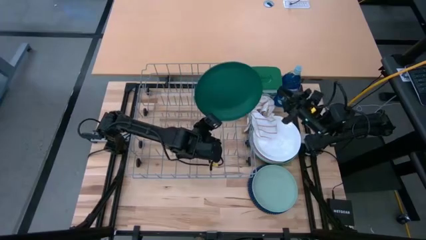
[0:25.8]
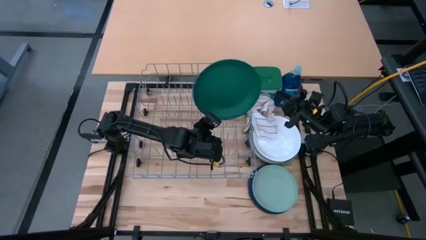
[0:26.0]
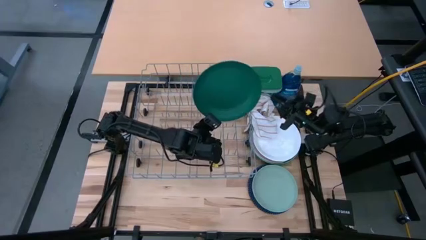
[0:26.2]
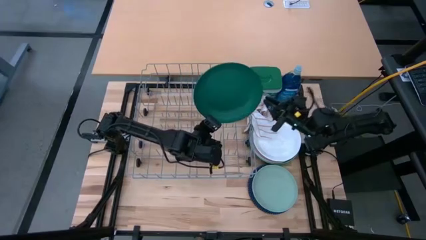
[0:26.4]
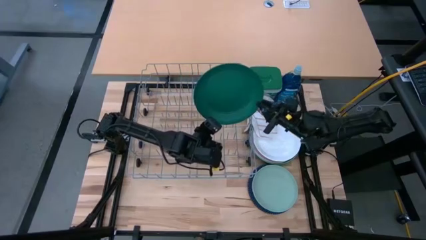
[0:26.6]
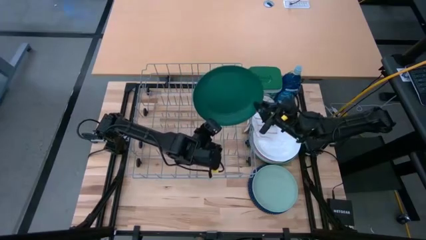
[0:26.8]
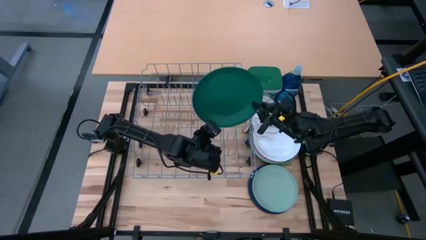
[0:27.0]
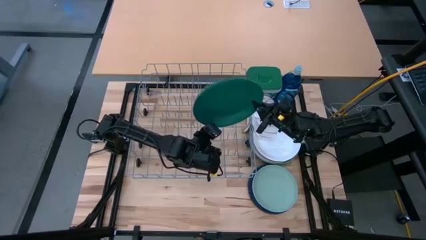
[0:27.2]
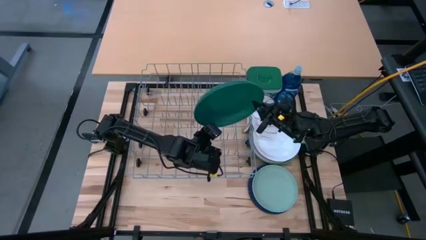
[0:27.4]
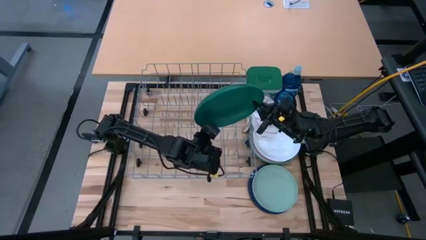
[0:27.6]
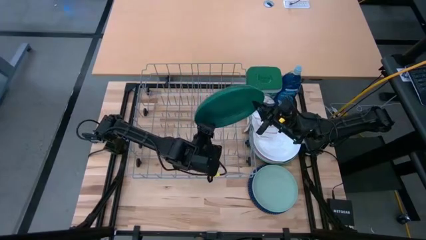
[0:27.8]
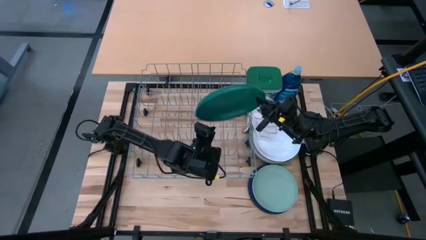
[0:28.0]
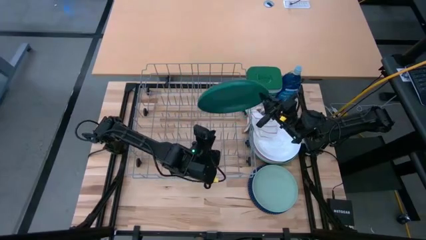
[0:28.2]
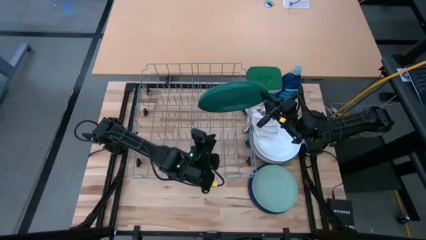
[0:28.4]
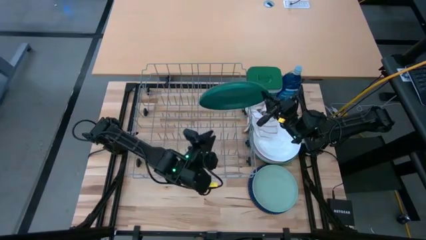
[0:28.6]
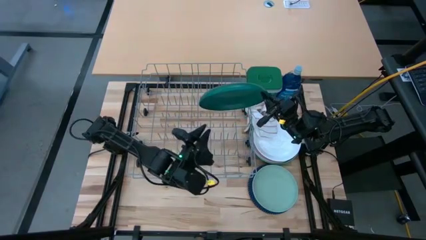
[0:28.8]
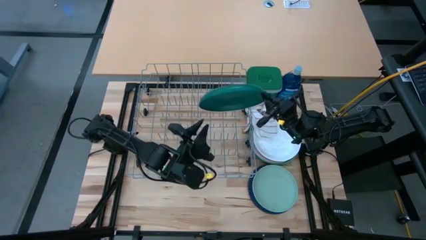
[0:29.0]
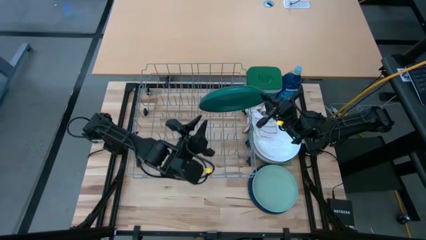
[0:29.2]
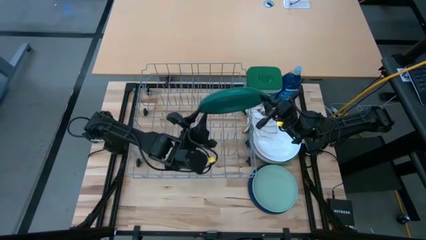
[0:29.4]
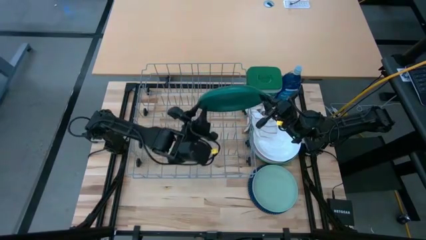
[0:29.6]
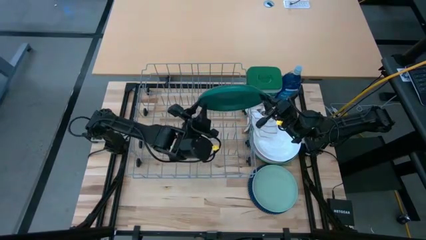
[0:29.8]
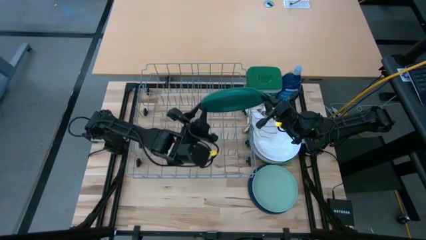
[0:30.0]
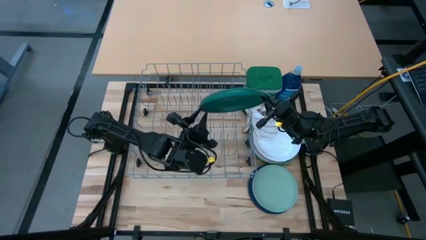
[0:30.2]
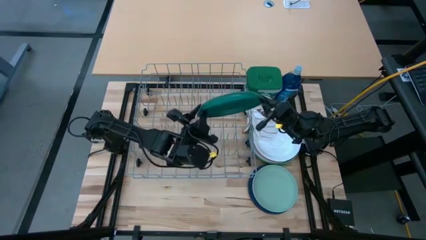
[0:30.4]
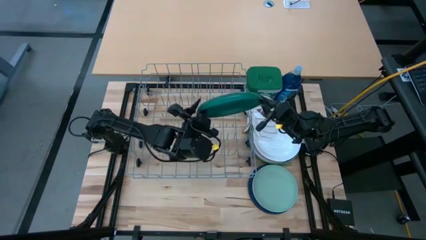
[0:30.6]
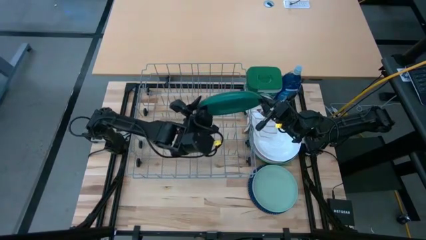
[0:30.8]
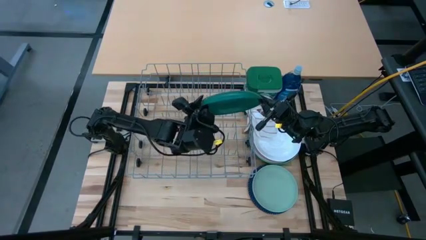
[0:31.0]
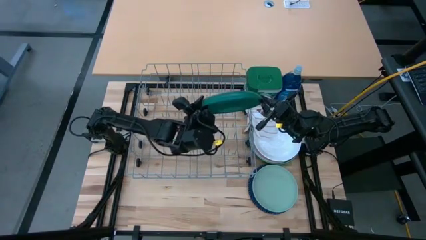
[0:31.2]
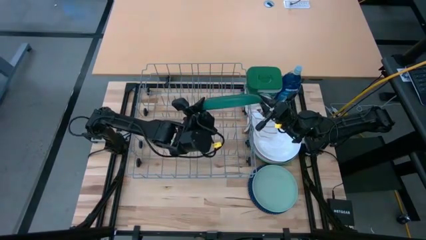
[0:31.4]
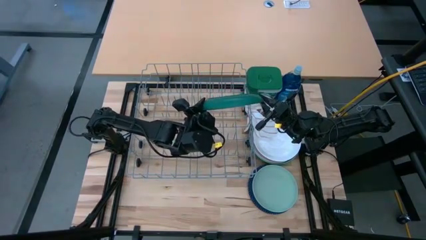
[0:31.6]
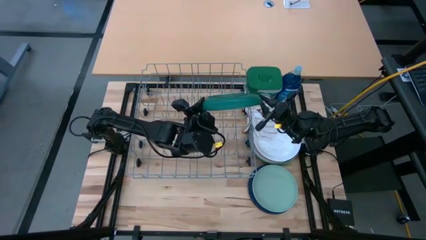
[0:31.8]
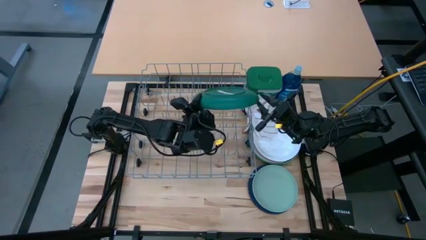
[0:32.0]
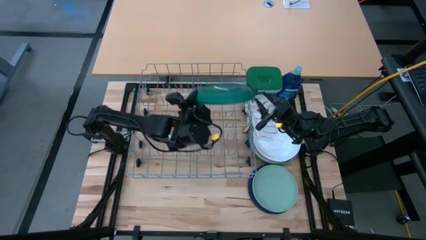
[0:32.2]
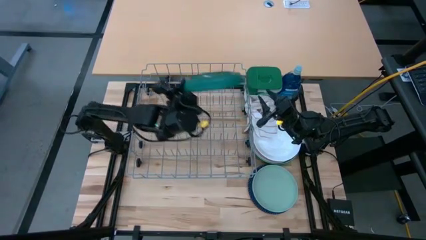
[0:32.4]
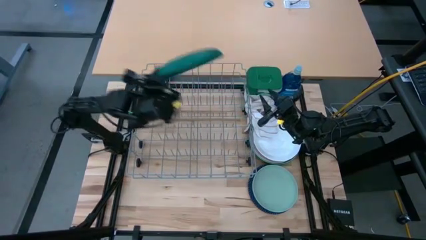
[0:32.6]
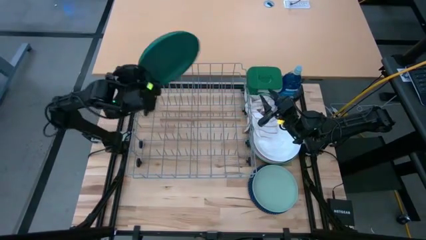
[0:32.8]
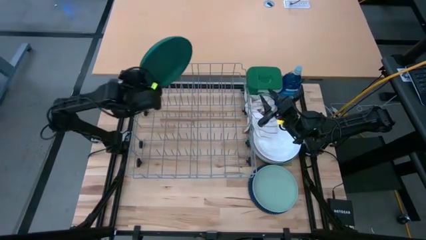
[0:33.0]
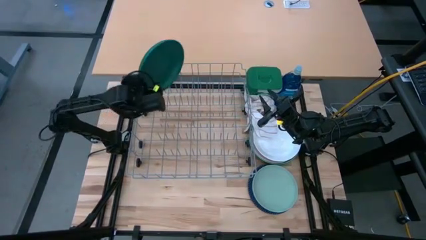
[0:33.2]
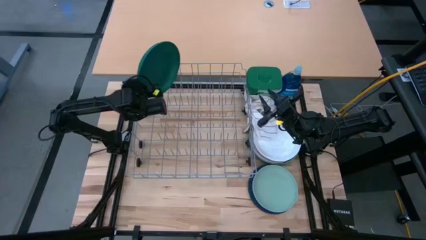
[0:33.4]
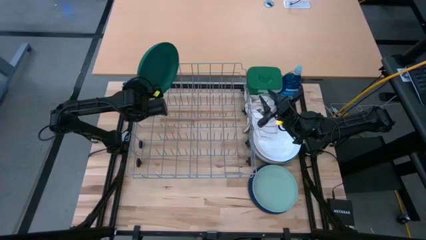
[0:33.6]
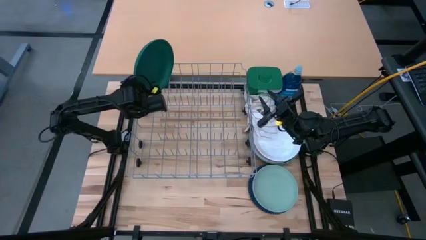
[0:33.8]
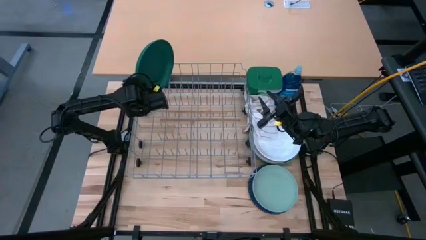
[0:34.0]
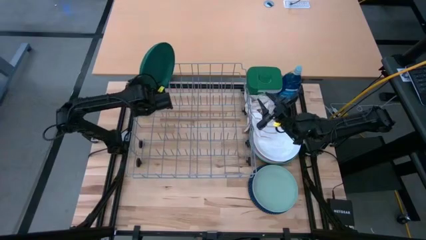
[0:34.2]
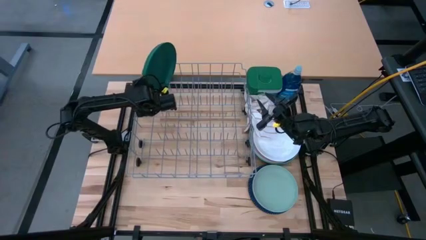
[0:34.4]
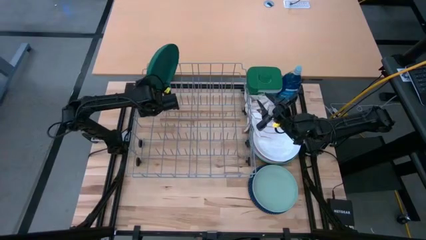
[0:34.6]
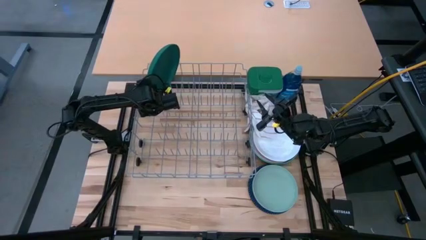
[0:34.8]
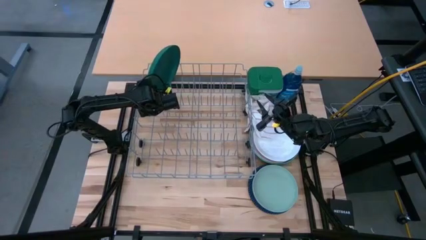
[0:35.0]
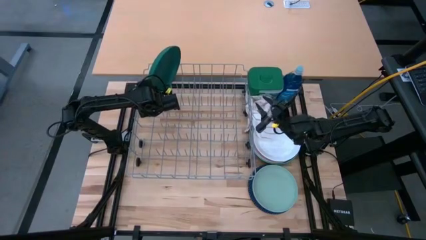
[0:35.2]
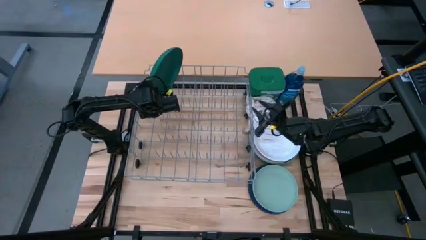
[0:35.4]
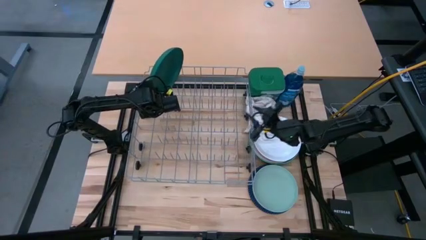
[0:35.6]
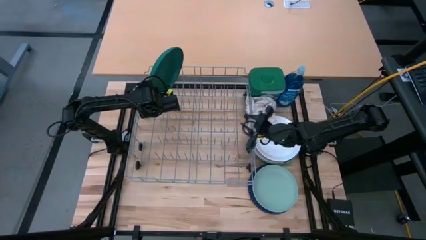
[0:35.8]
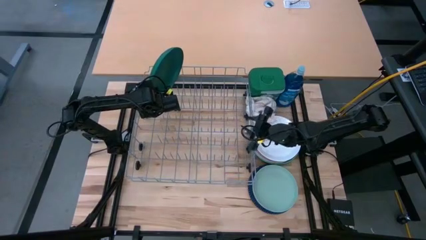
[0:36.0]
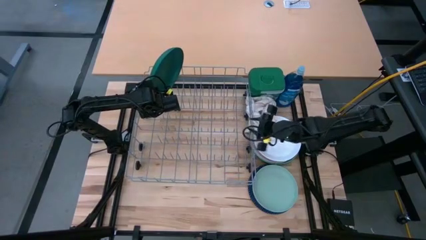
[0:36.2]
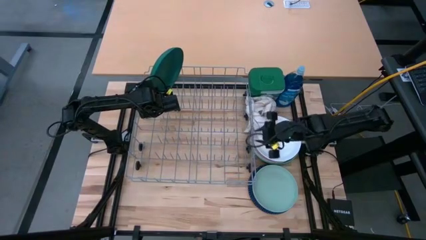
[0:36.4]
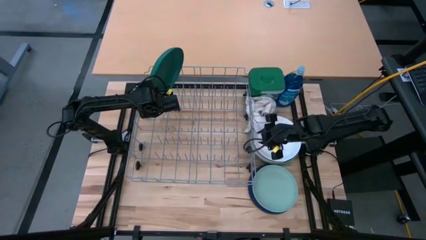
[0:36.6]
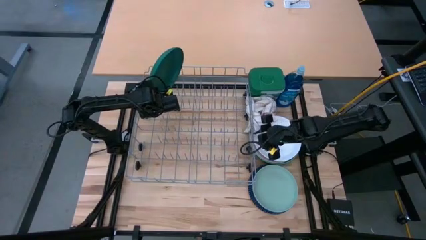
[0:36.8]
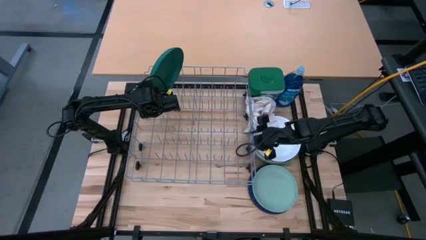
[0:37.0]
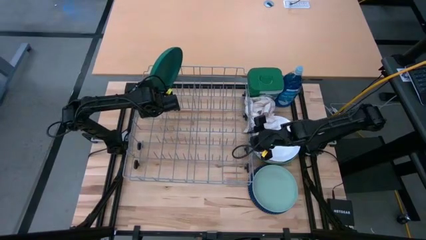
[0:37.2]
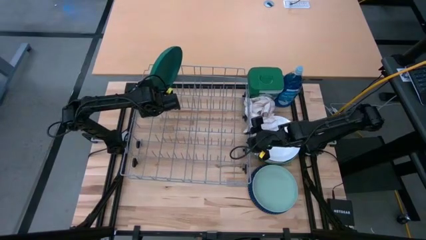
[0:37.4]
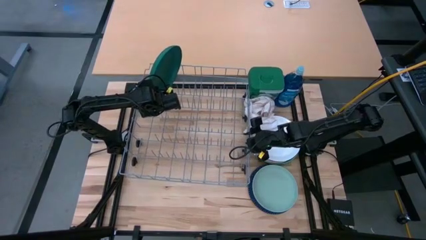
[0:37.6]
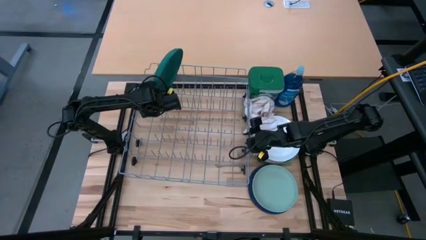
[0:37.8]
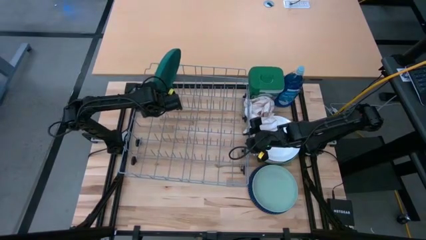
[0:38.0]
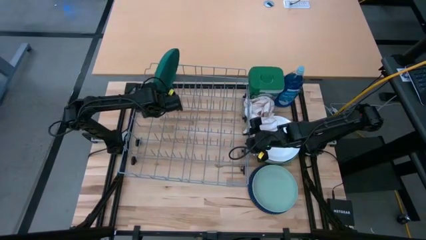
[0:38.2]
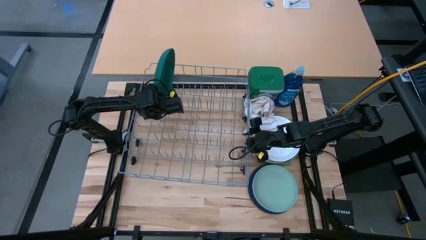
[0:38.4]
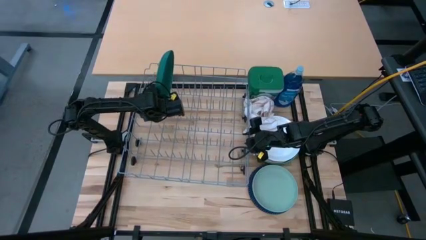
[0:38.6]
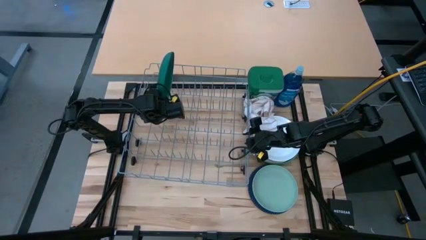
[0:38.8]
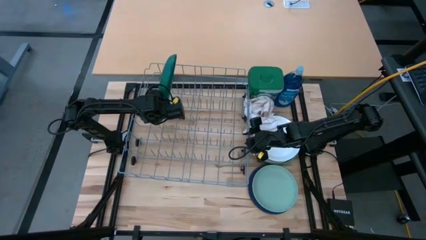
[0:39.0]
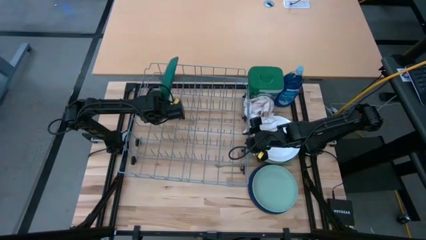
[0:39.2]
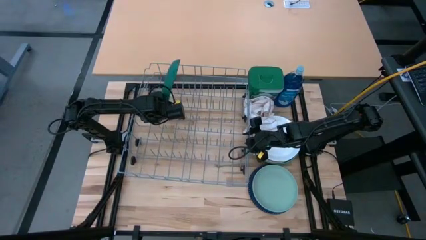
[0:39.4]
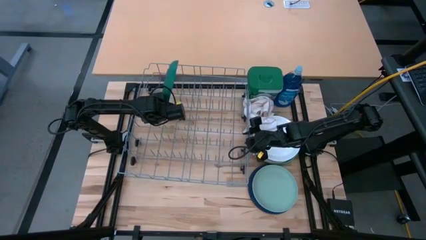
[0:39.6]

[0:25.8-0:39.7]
Task: Sort dishes
Put the green plate in the dish rack

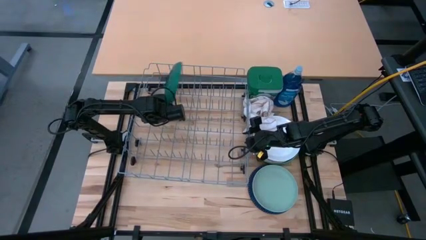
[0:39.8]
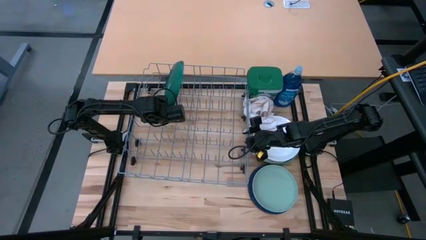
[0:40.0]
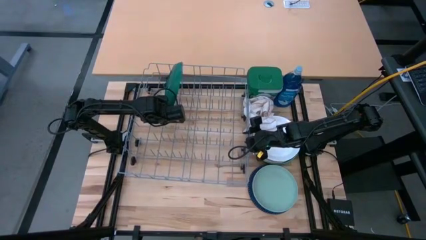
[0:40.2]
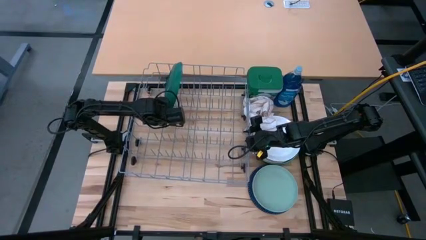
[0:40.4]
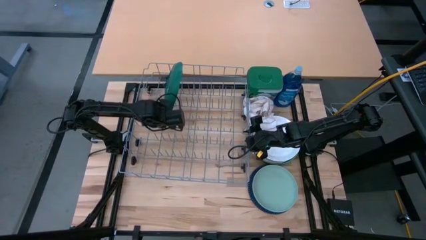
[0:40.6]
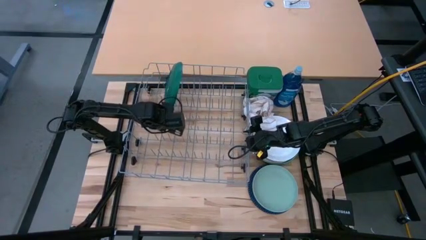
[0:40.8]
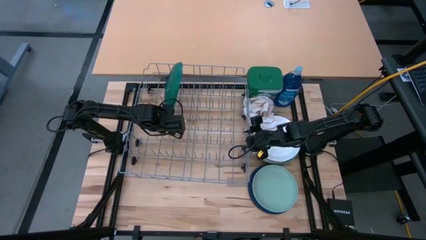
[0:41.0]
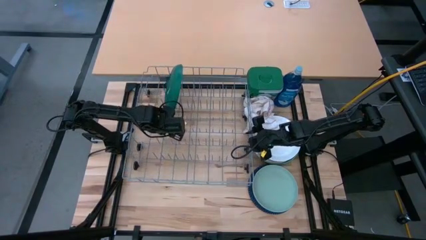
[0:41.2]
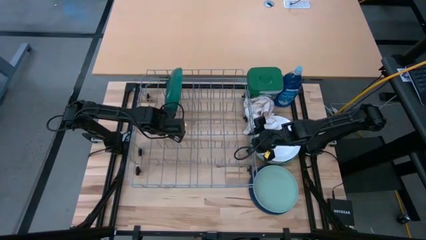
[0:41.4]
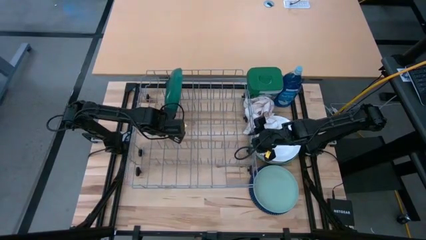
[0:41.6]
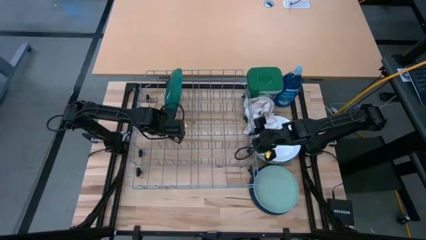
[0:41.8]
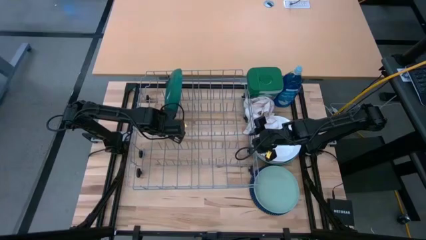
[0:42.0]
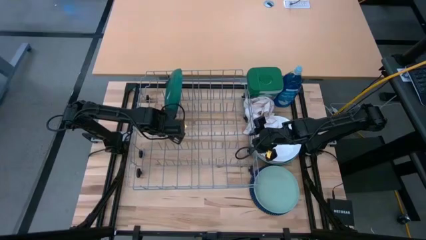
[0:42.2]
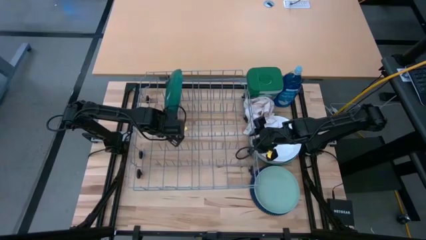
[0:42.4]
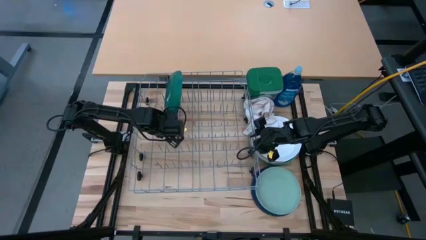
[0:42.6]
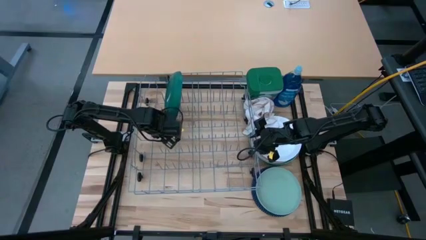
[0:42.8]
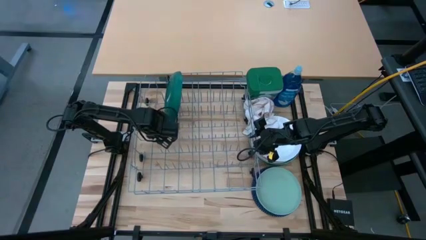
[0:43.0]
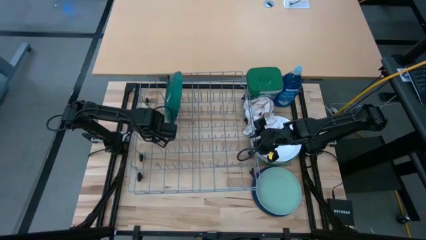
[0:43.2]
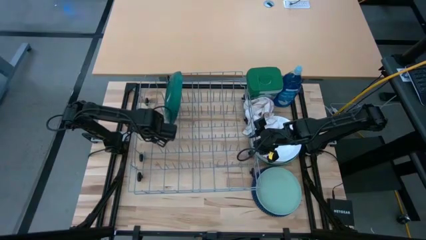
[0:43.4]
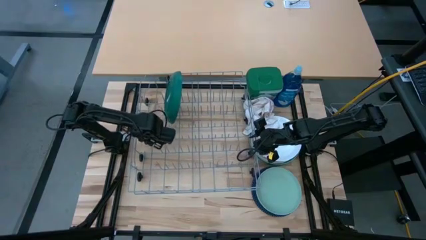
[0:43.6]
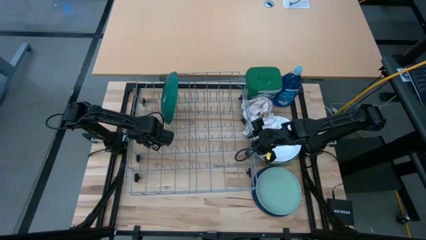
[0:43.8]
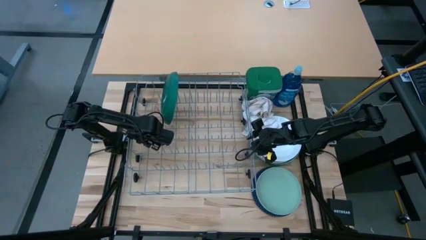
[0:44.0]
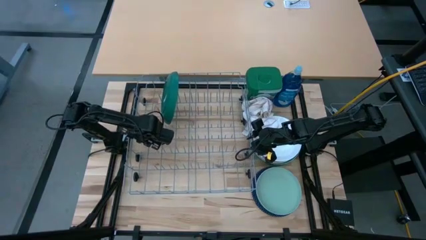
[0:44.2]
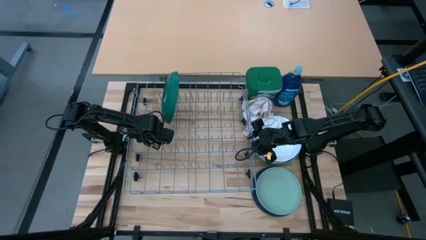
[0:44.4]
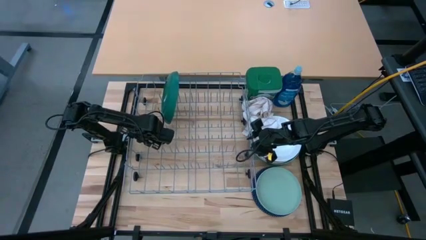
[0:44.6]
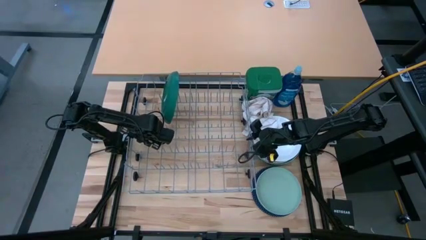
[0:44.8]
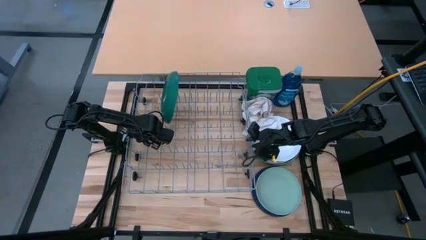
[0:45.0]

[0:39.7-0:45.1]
Adjust the dishwasher rack
